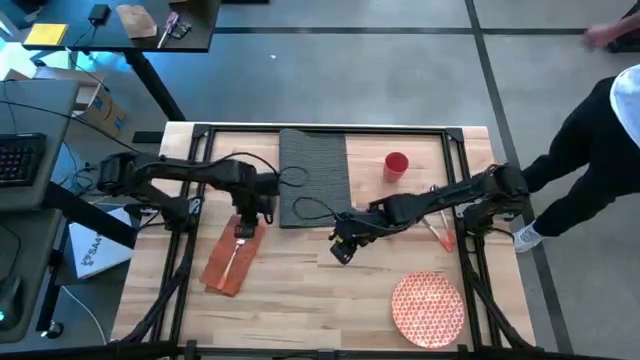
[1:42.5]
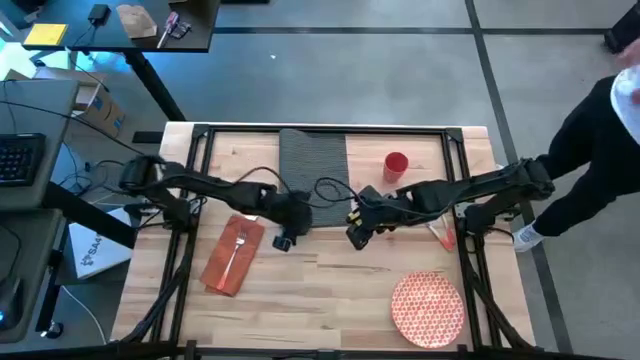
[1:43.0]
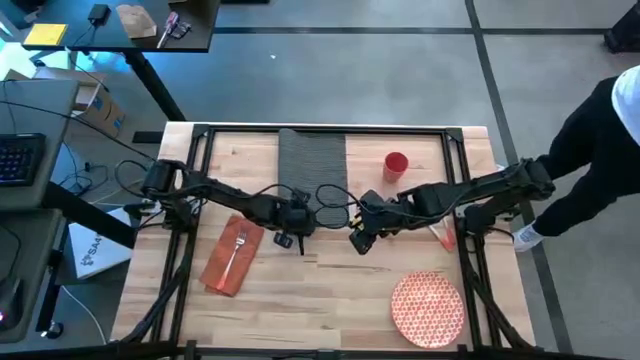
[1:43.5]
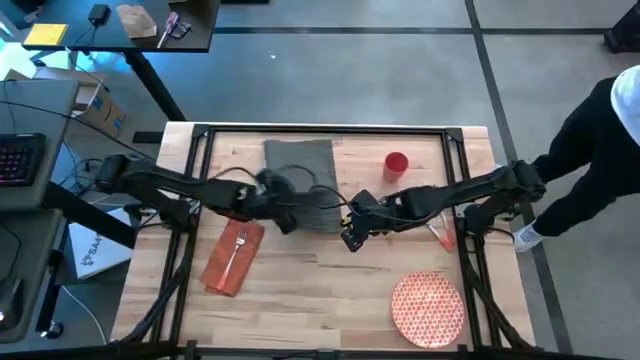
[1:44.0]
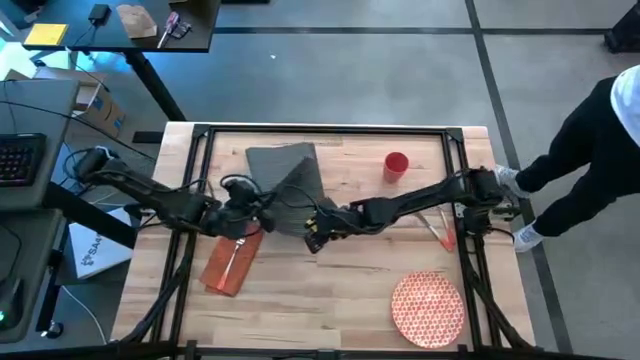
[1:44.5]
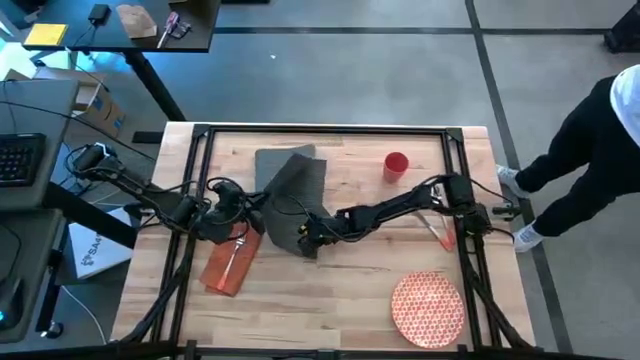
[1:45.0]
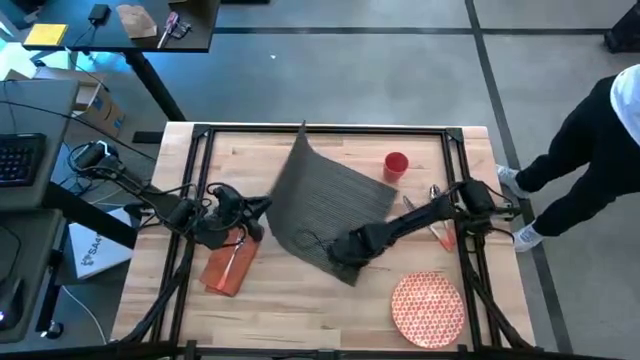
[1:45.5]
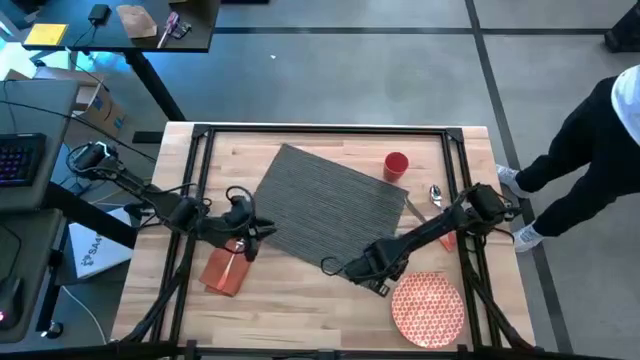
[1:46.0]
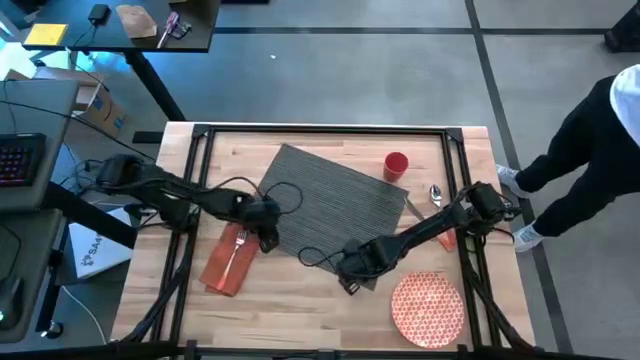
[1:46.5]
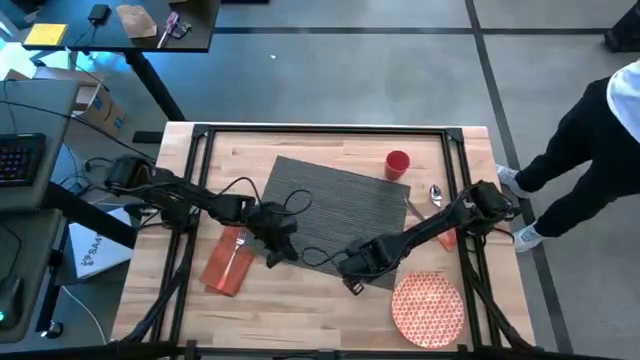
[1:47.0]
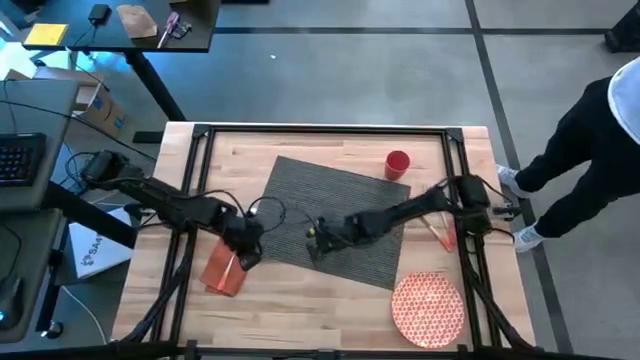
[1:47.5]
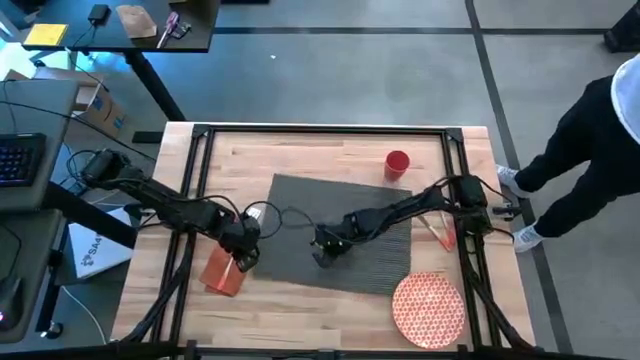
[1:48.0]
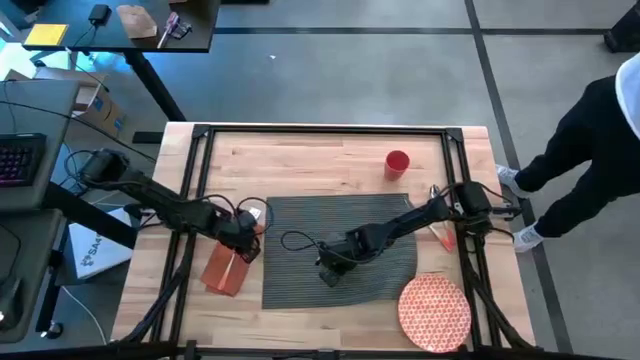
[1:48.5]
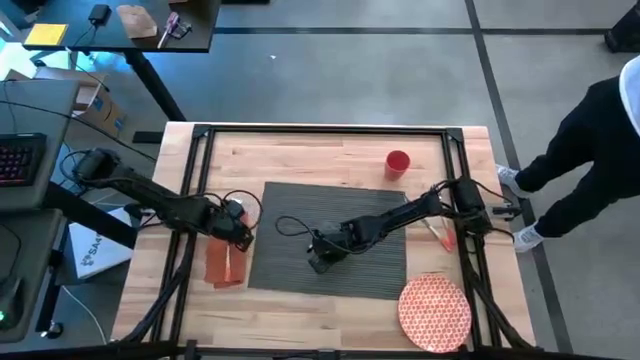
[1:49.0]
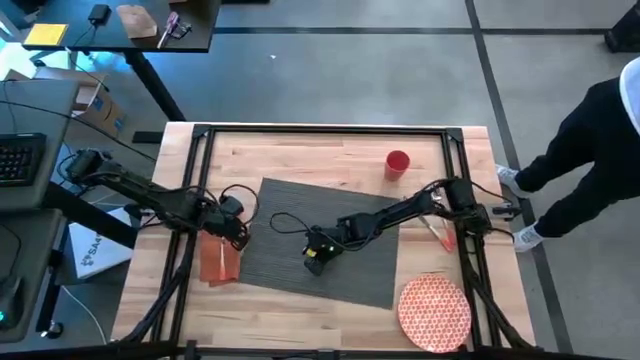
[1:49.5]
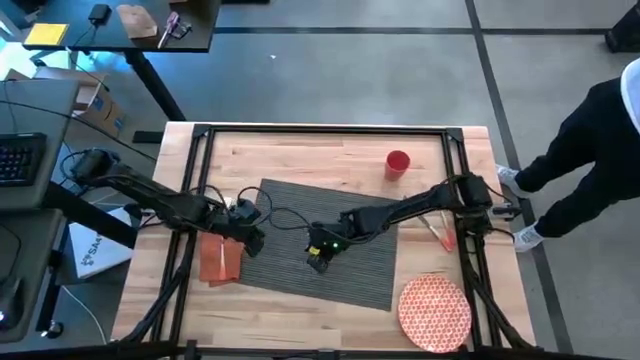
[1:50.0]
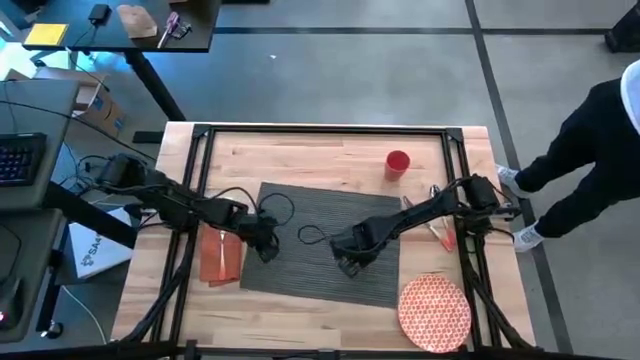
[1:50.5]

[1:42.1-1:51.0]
Task: Set table place
Prepare the gray placemat

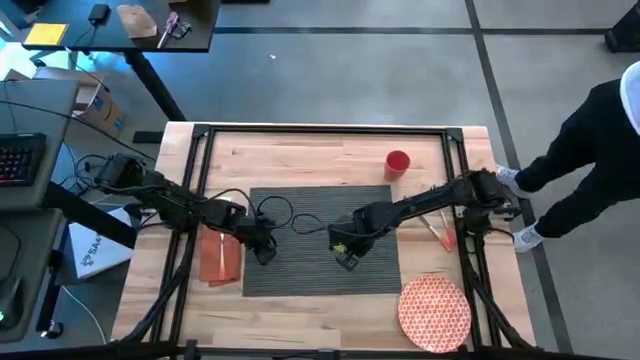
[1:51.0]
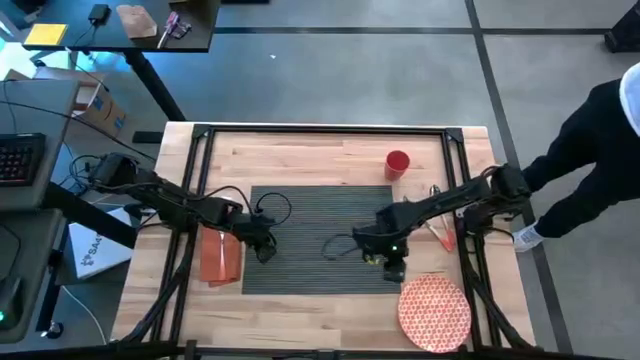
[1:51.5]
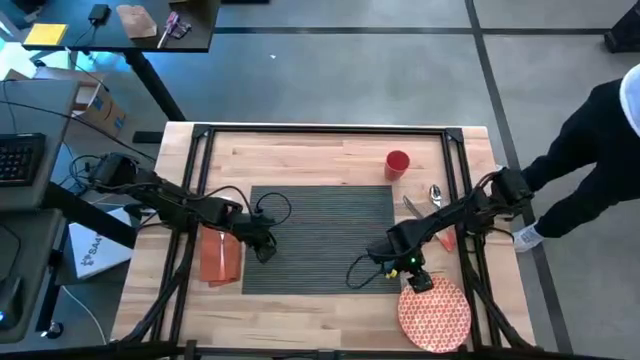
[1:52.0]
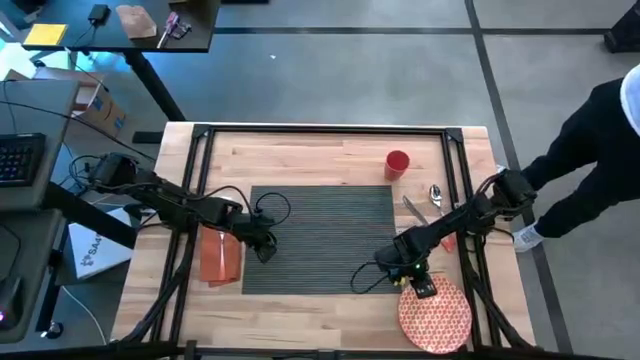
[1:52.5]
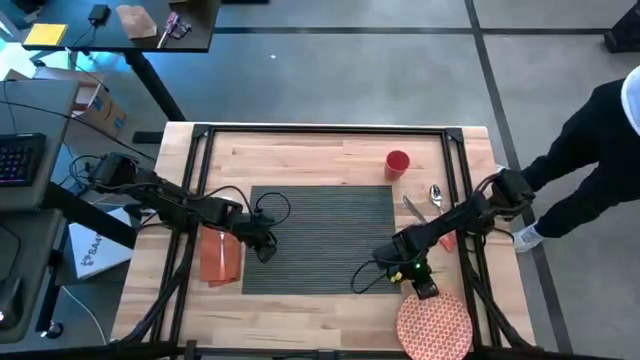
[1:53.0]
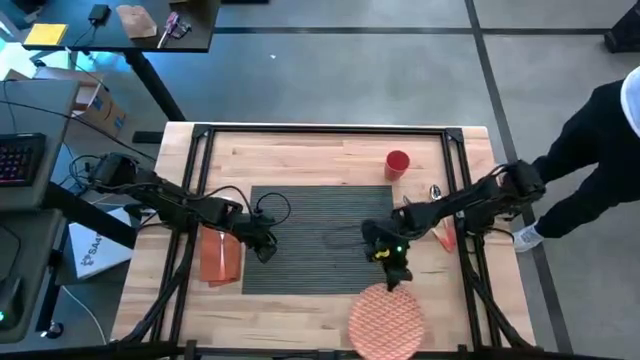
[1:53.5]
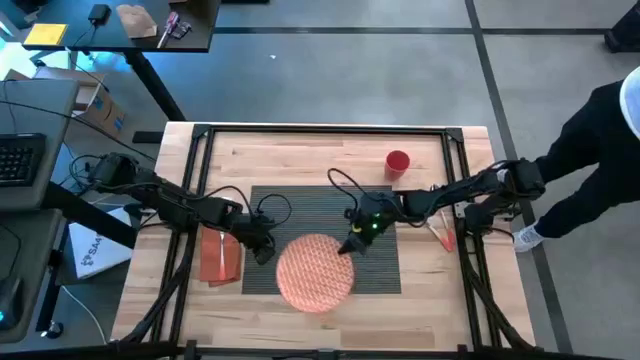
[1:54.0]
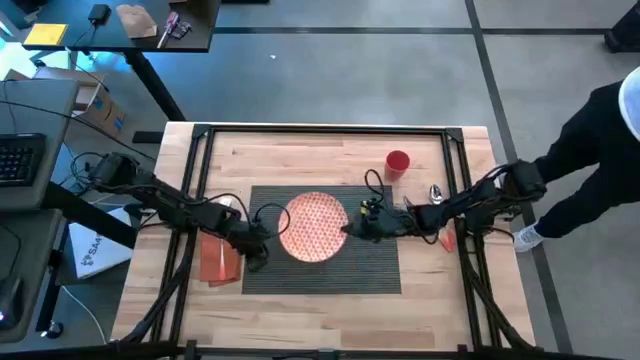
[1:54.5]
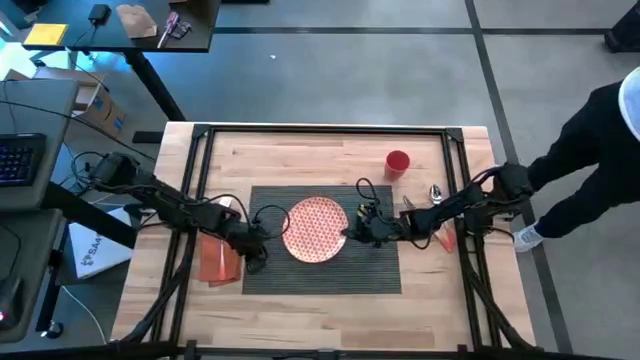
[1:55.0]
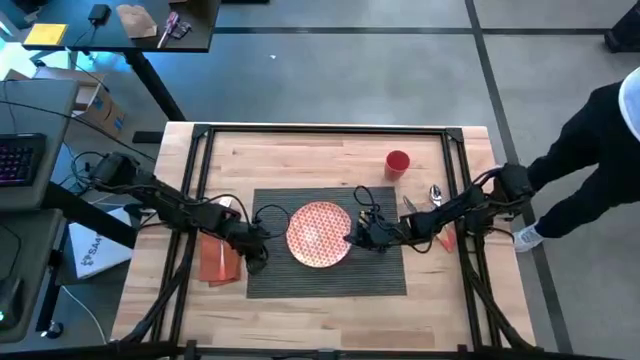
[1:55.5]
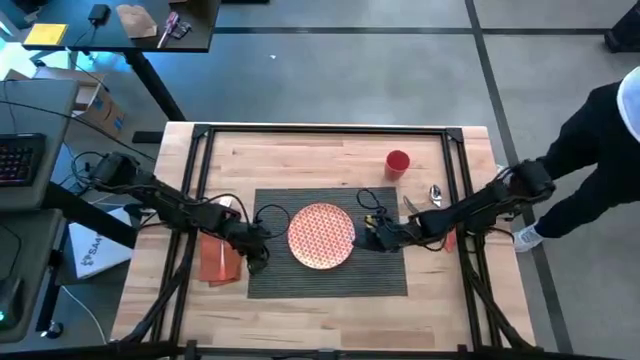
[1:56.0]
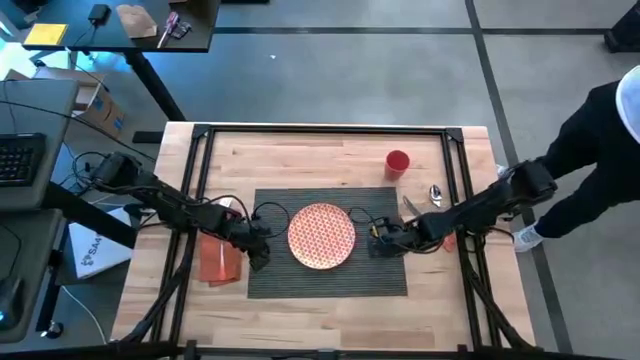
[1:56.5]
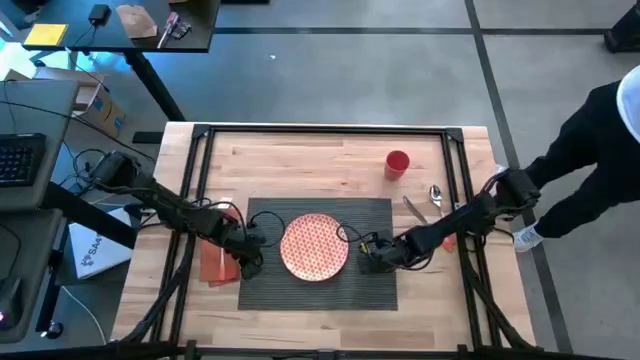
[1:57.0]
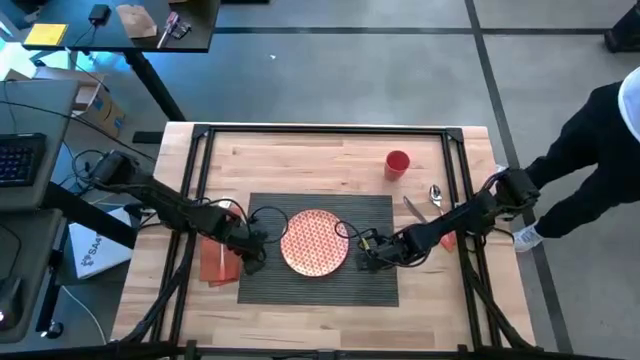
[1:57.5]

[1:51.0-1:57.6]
Put the orange plate on the gray placemat

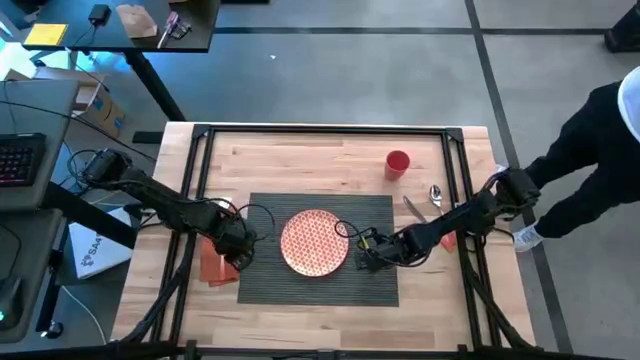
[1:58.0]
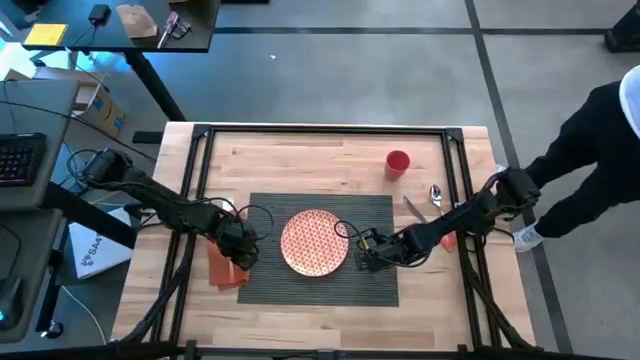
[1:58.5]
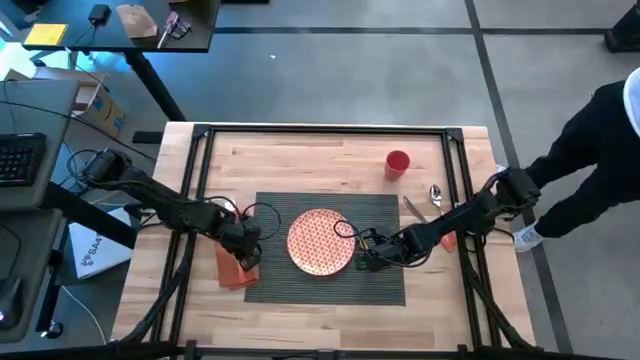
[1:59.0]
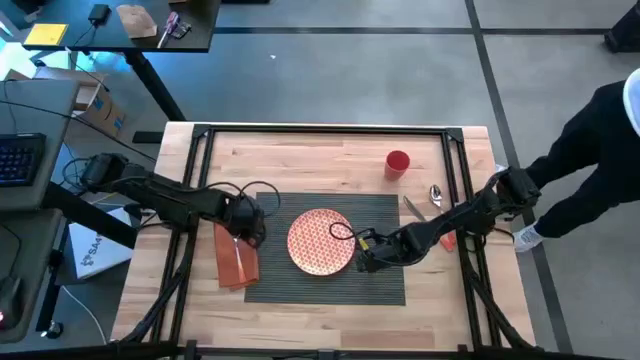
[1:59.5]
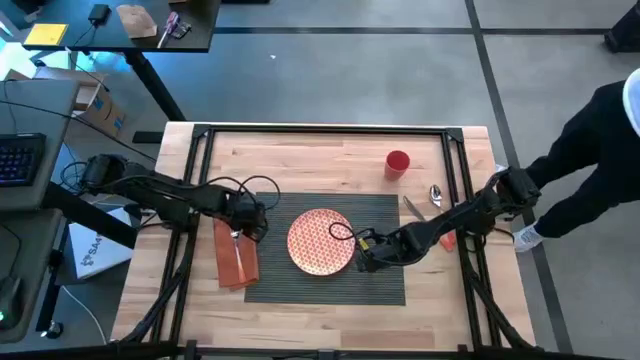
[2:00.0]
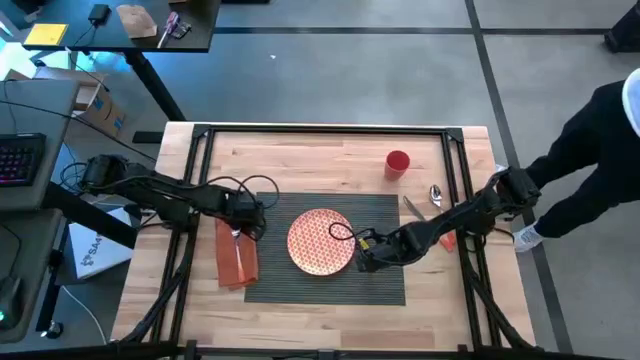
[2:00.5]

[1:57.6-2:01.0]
Put the orange napkin on the gray placemat

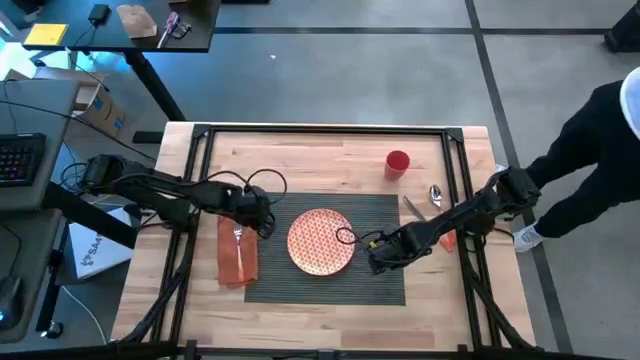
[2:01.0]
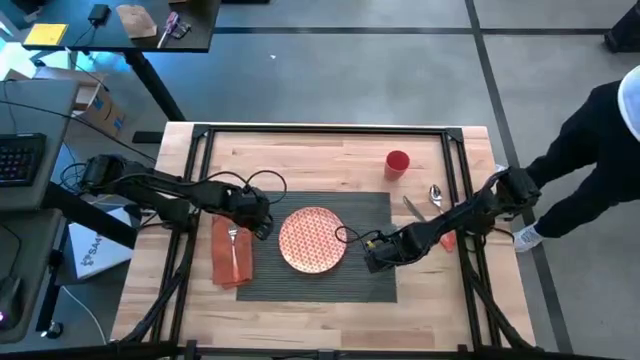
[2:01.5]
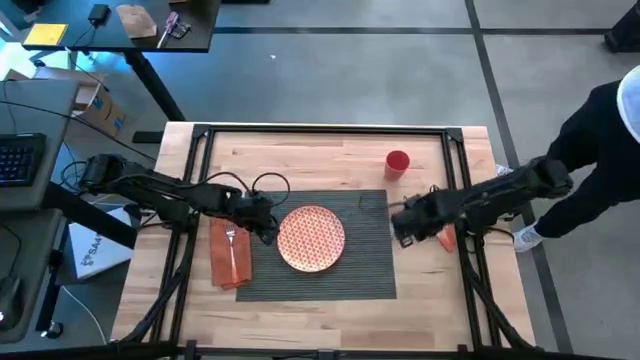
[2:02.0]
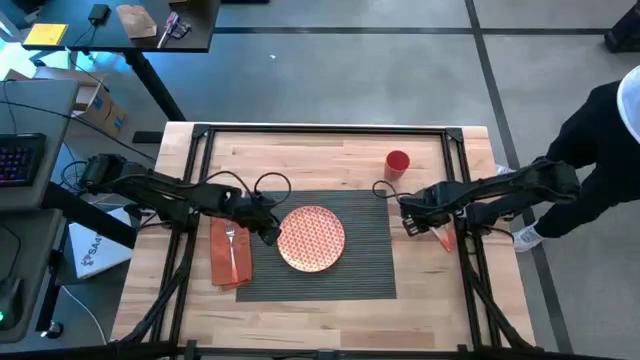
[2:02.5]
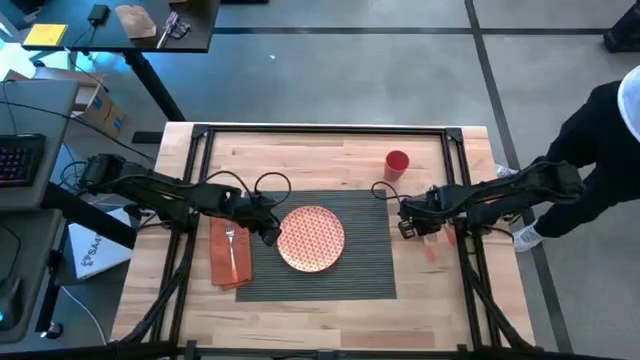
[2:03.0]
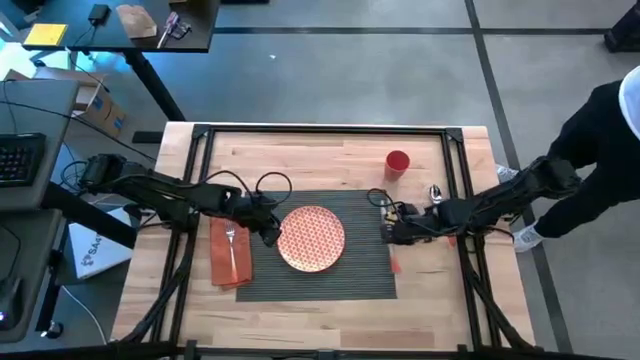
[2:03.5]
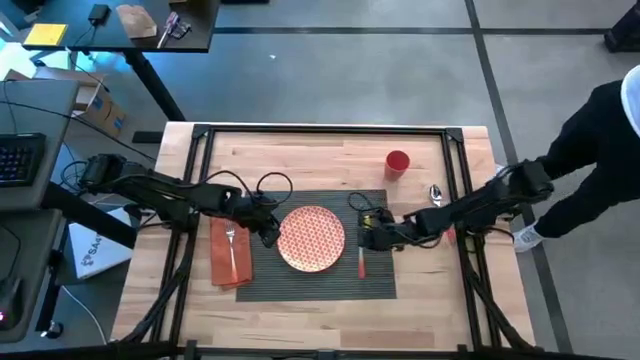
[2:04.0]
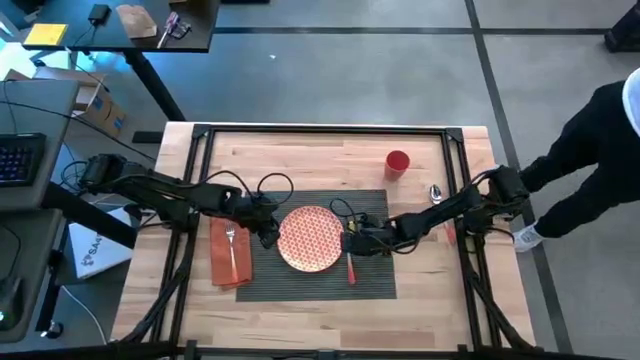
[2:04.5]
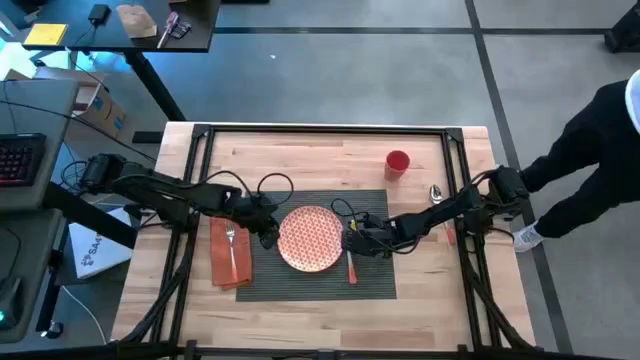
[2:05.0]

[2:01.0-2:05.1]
Put the orange knife to the right side of the orange plate on the gray placemat
